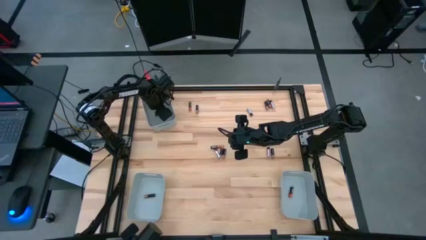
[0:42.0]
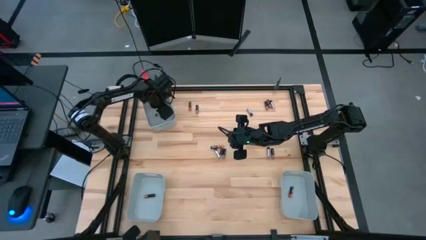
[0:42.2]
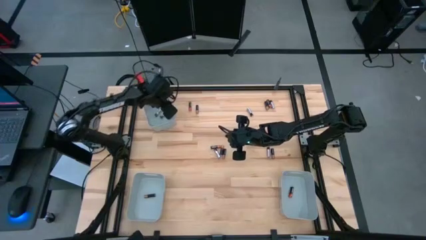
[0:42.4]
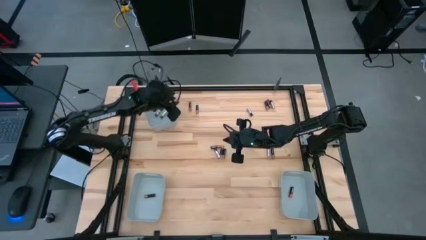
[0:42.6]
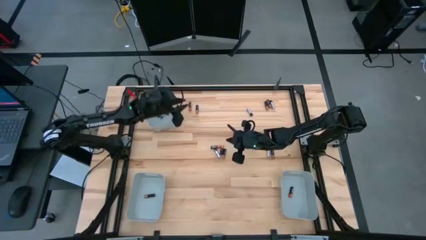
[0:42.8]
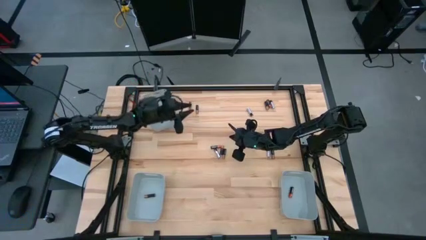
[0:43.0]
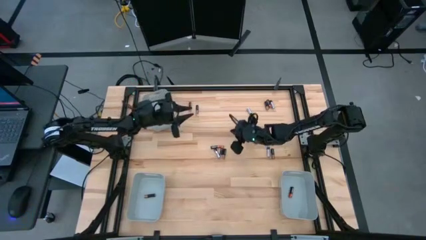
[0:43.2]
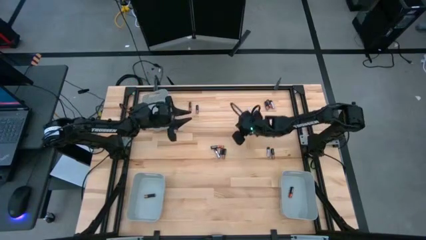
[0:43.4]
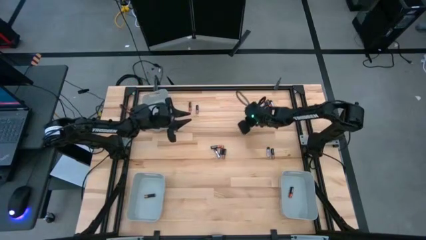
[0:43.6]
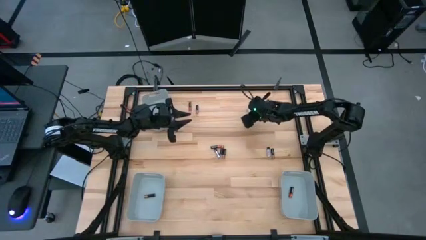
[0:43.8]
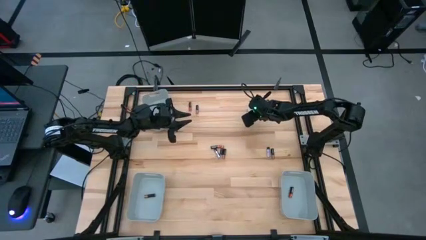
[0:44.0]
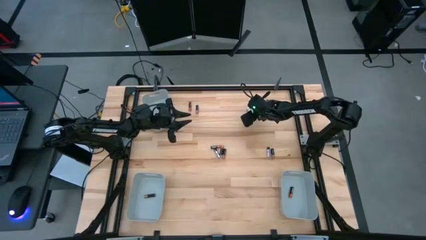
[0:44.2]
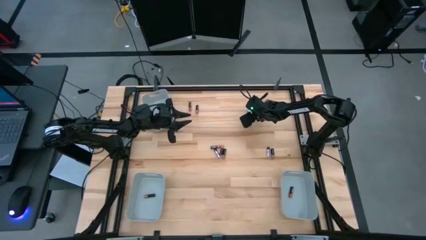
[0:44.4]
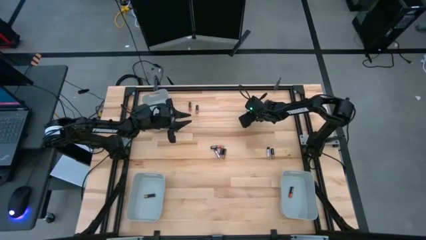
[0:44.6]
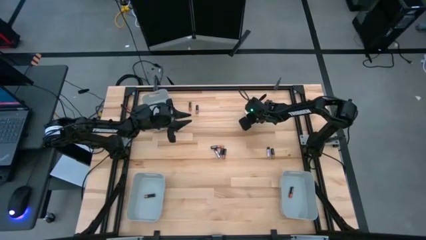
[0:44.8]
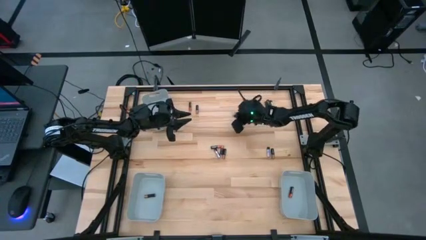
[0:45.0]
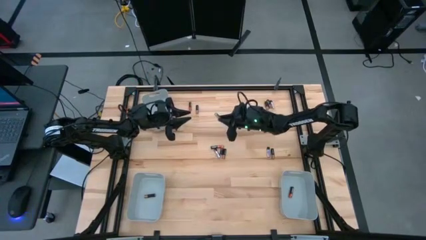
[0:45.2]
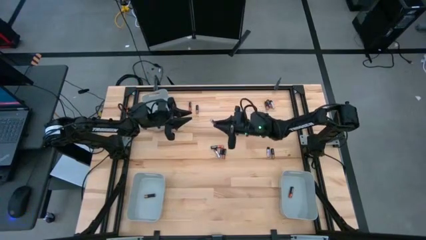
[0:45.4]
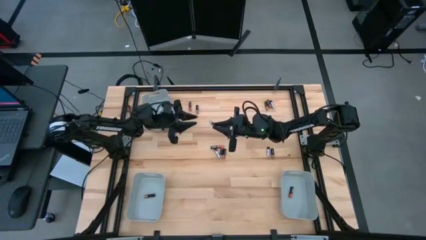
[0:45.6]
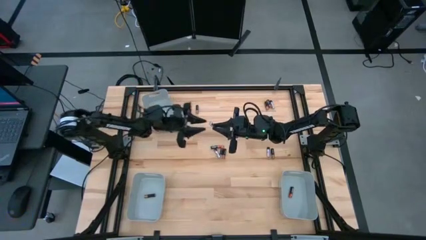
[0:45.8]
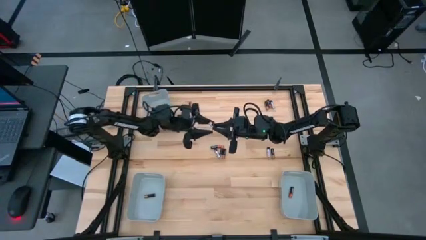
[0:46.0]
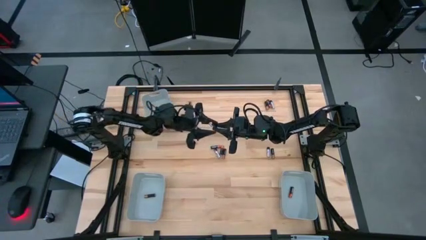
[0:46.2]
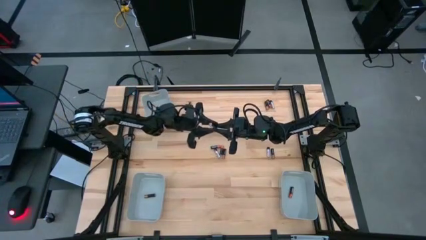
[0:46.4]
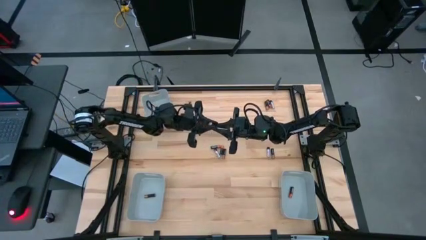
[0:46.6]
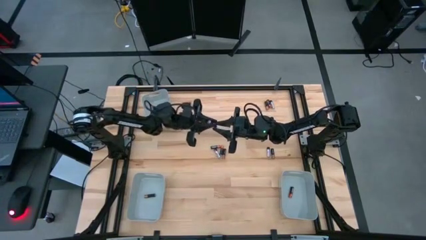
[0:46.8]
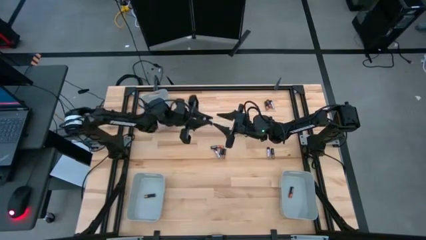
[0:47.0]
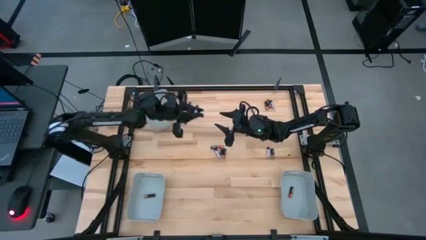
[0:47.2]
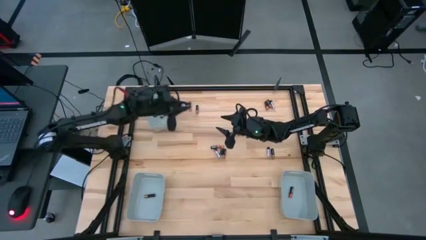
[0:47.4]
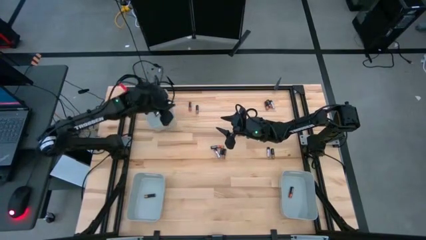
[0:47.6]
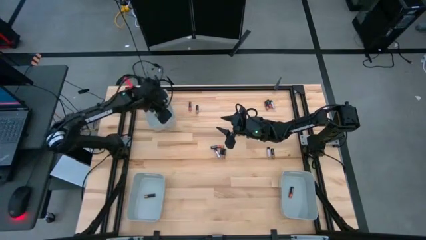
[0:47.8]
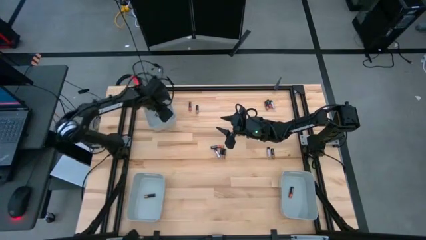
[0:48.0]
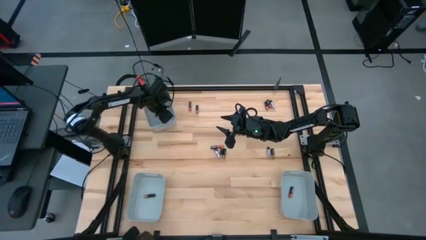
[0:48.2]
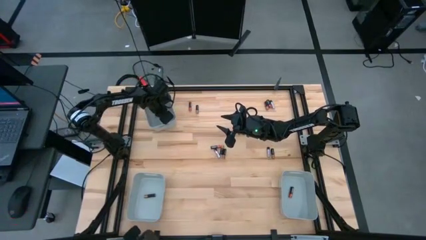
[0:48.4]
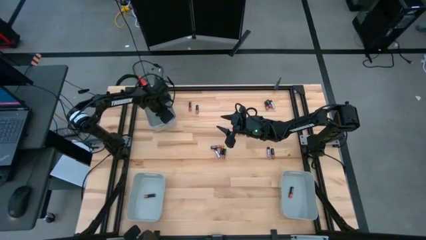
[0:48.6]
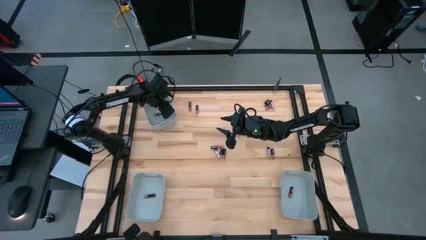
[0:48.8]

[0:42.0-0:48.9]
Task: Sort batteries
Put the silver battery into the top left gray bin

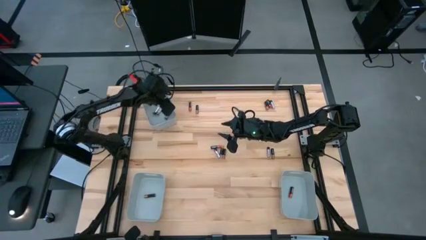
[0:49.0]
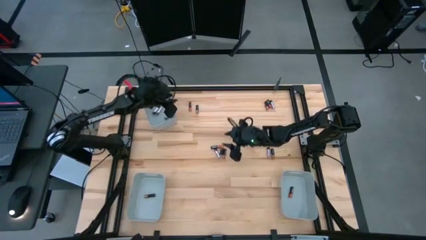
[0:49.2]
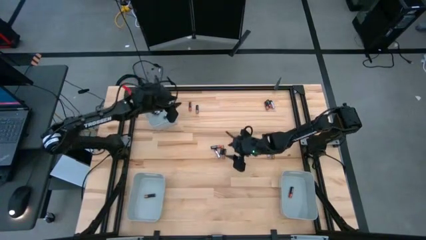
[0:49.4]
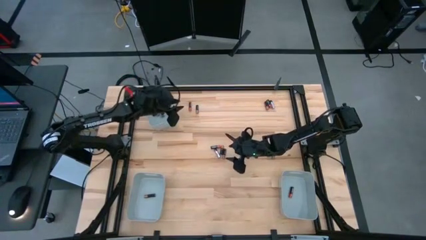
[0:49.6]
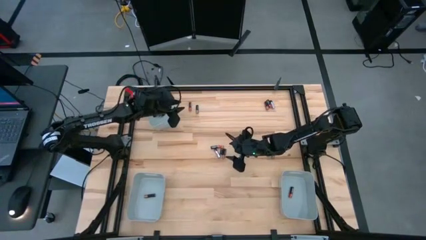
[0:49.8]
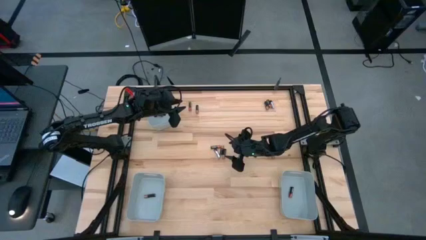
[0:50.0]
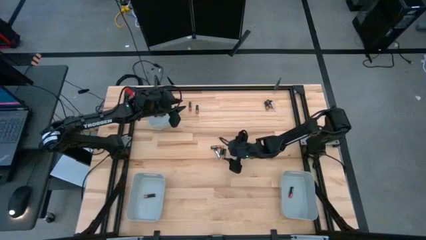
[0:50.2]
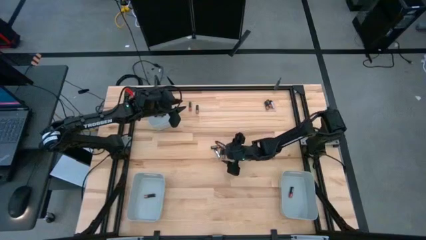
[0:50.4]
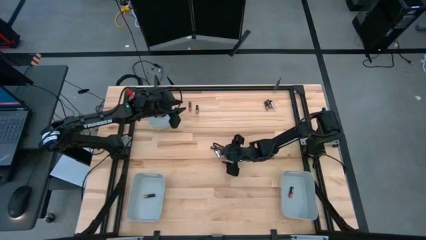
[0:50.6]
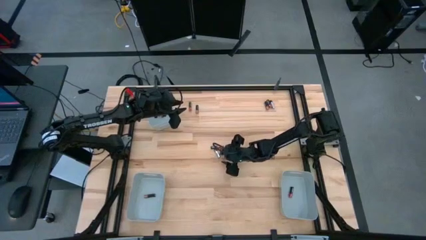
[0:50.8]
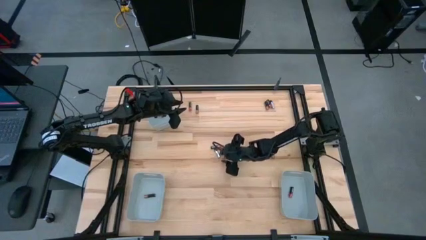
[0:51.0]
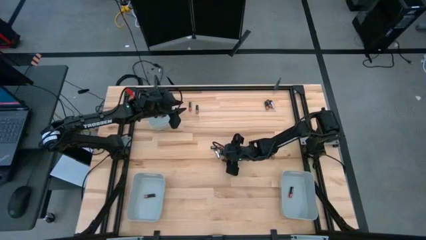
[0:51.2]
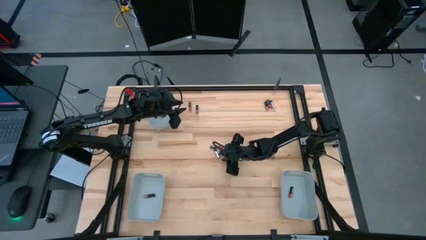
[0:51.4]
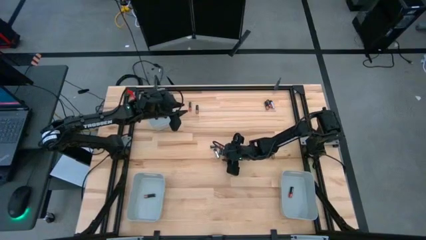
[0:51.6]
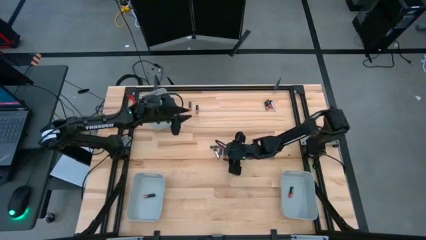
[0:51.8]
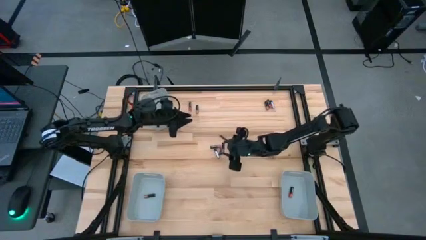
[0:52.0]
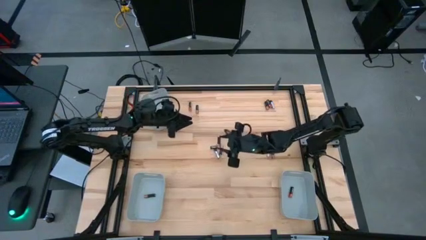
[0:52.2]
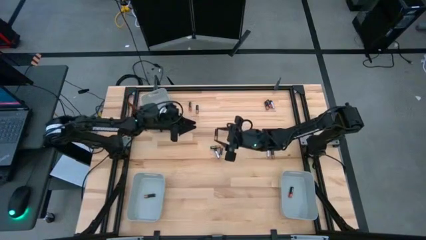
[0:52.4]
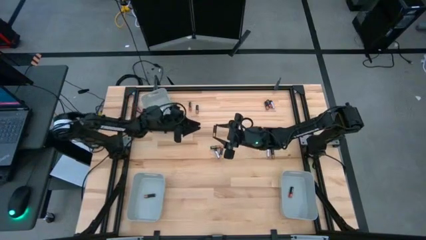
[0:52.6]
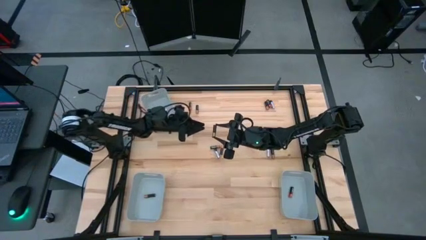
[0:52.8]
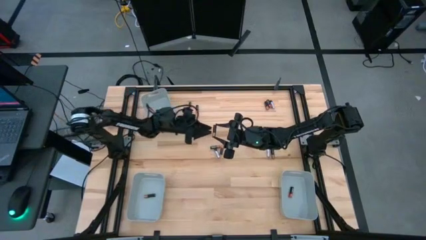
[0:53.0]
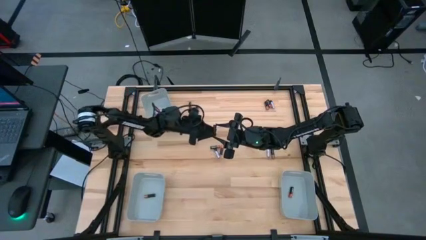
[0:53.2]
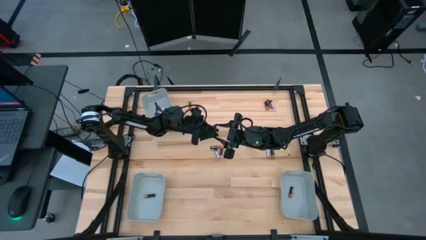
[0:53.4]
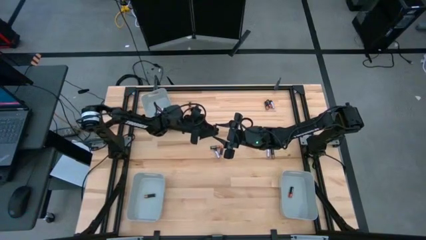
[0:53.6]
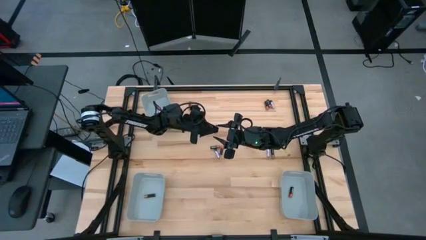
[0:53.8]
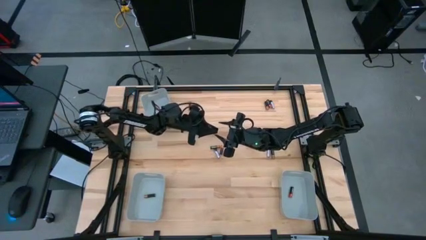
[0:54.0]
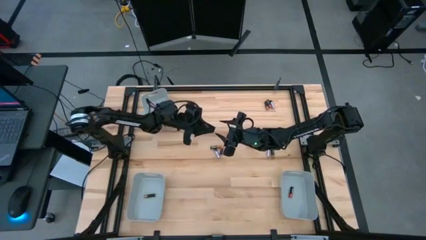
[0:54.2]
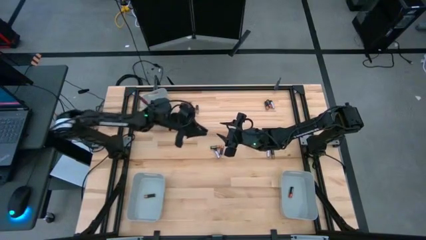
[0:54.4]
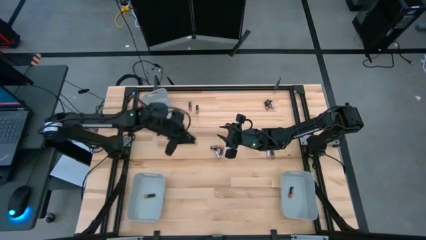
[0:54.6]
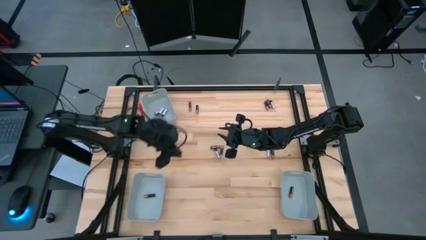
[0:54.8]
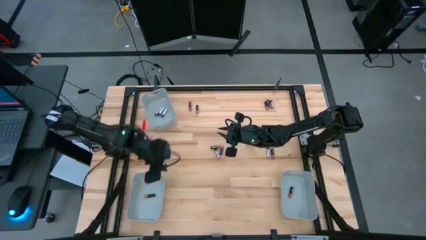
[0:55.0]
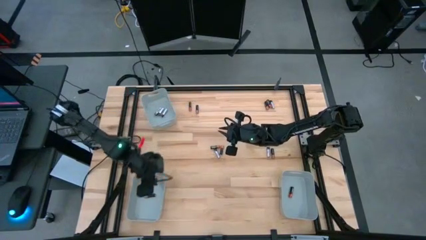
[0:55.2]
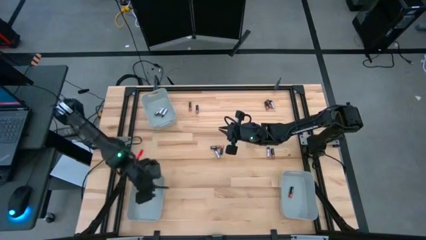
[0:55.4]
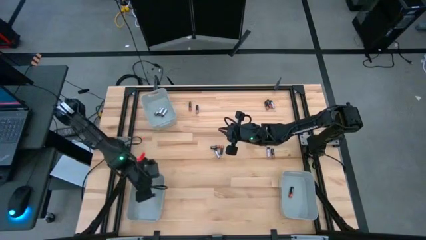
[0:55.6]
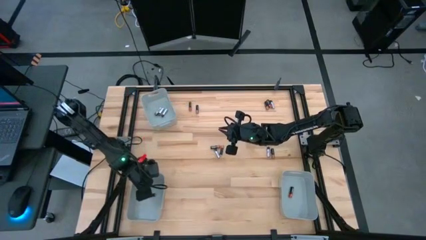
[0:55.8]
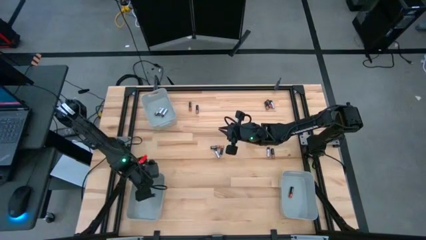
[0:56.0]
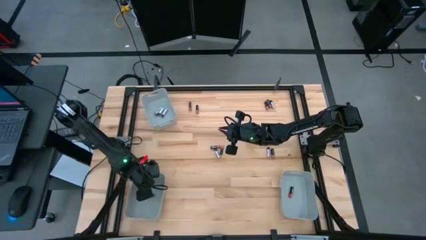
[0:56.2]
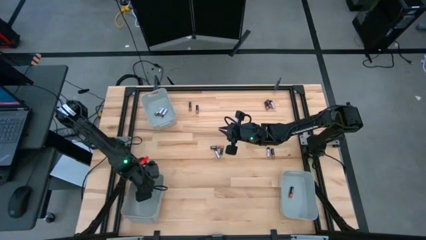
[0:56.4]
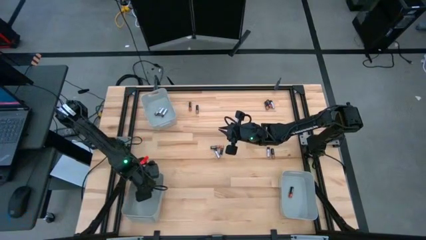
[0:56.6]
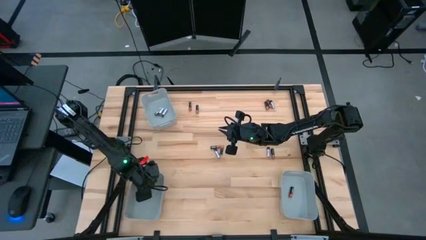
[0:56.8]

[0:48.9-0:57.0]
Put the black-brown battery into the bottom left gray bin

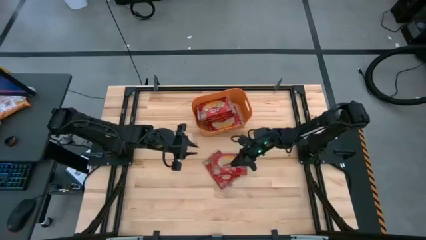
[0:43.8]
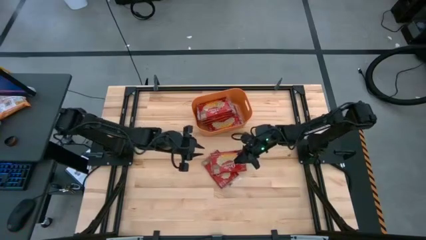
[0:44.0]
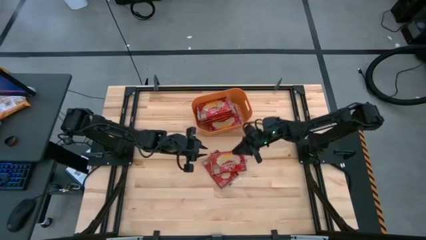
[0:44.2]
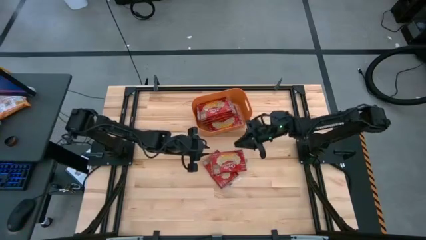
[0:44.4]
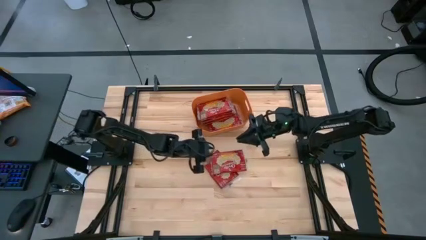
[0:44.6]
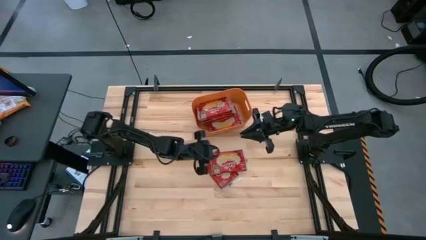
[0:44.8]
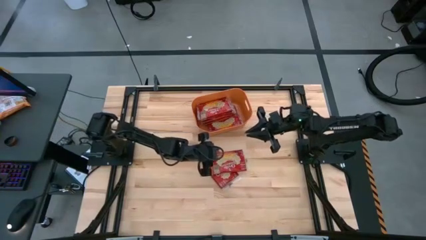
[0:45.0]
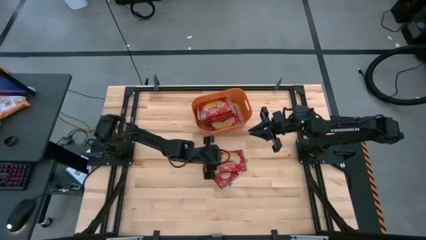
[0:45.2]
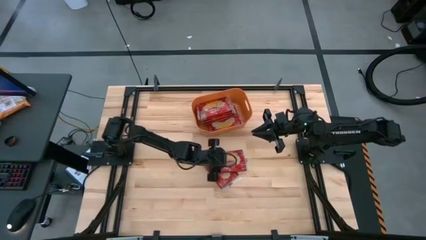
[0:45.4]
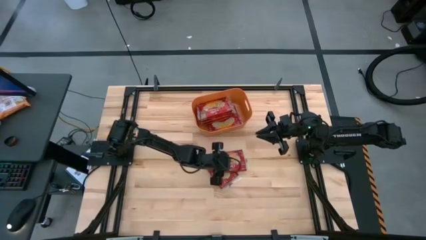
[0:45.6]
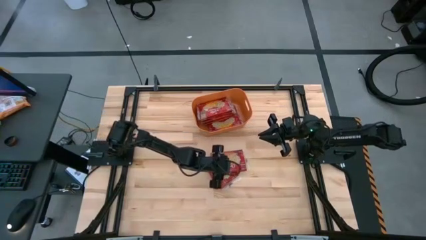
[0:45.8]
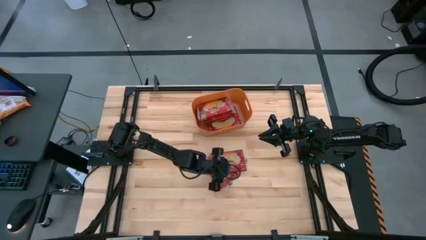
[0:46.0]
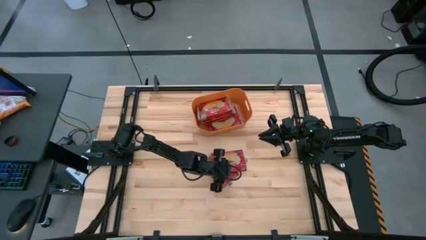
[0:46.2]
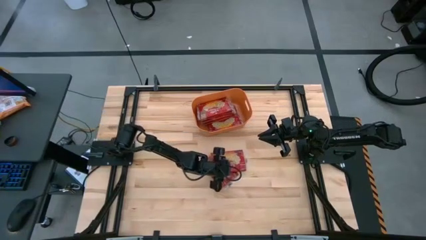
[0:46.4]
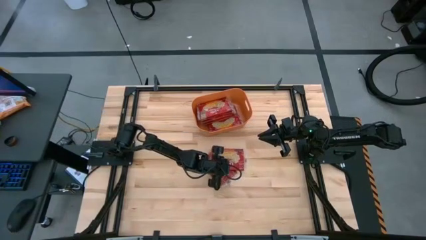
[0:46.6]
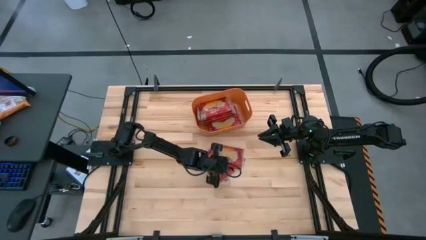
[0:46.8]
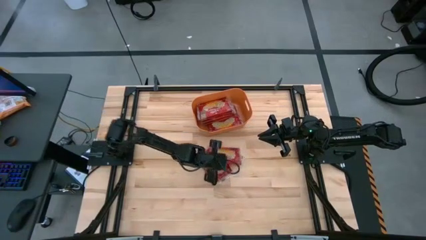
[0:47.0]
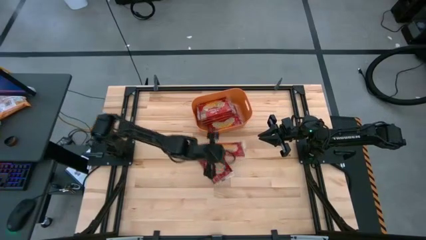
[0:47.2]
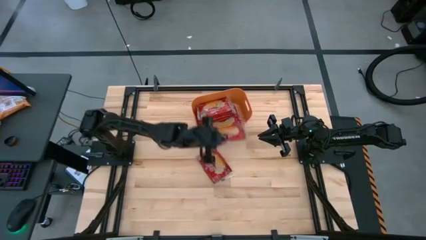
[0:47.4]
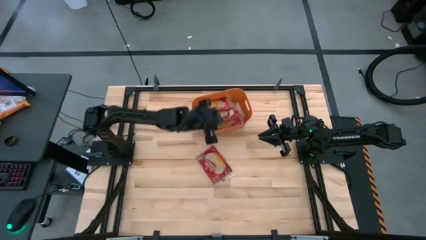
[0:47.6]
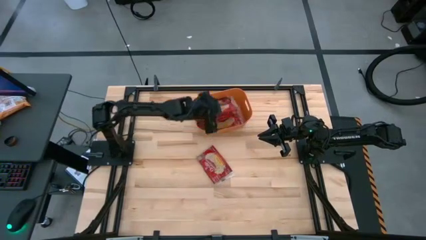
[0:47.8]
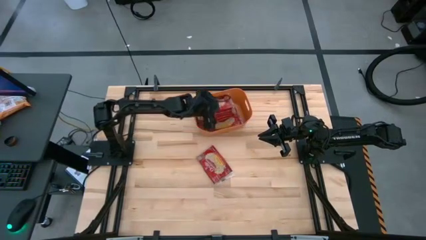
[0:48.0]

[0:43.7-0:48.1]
Task: Sort popcorn bags into baskets
Put the red popcorn bag into the orange bin
